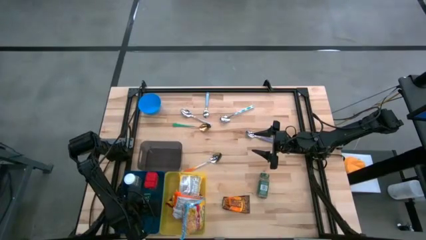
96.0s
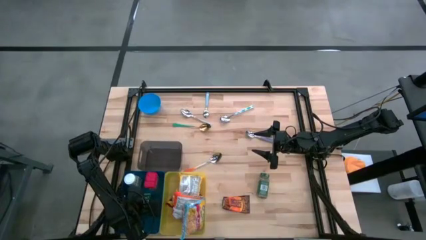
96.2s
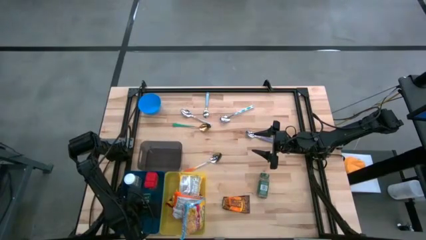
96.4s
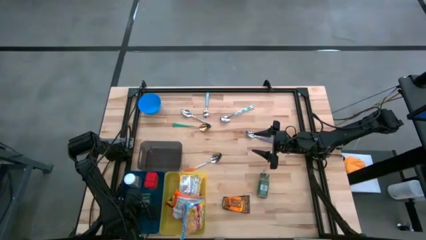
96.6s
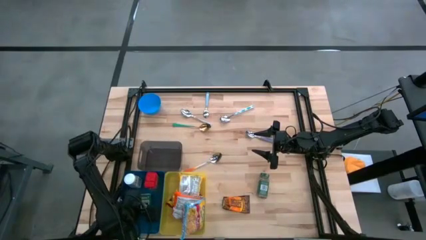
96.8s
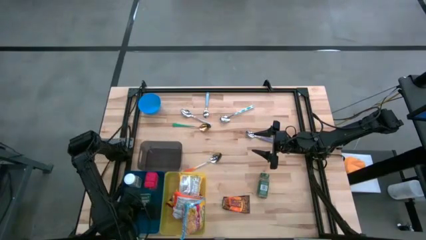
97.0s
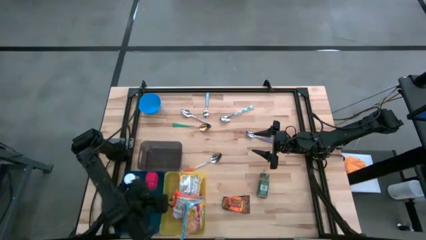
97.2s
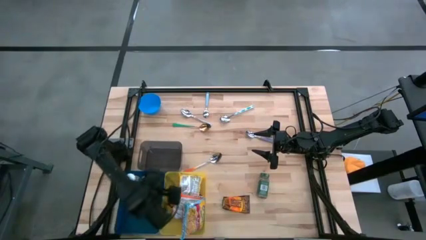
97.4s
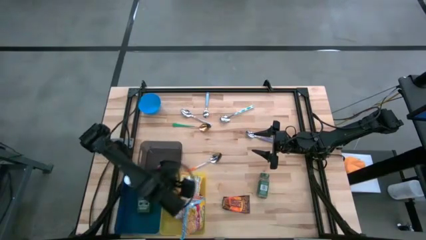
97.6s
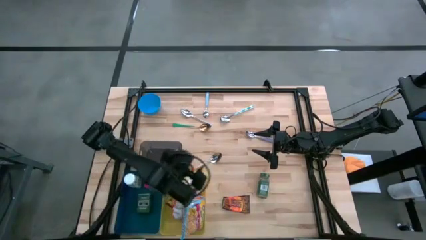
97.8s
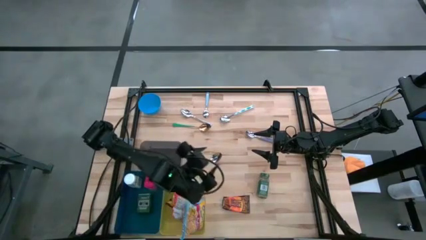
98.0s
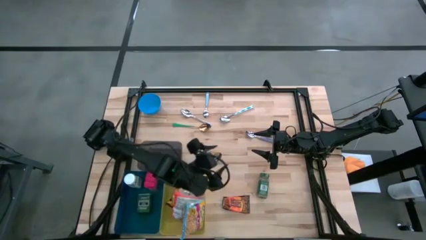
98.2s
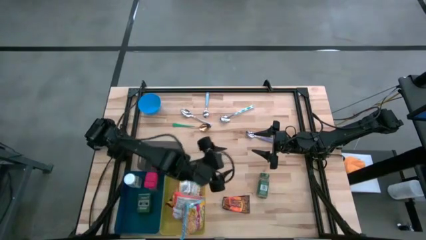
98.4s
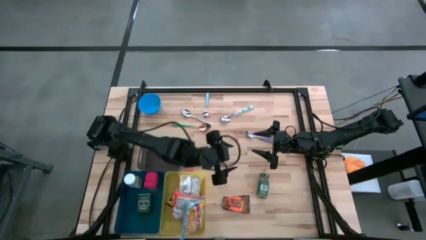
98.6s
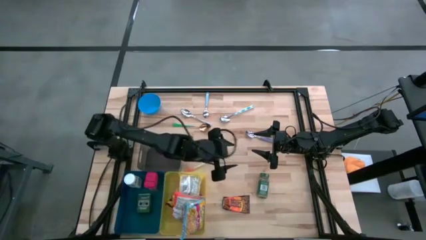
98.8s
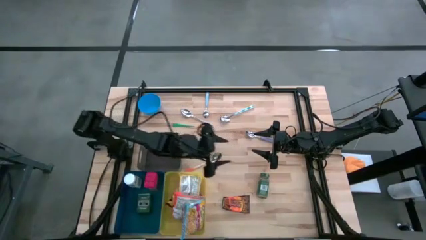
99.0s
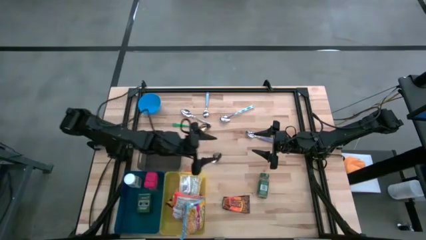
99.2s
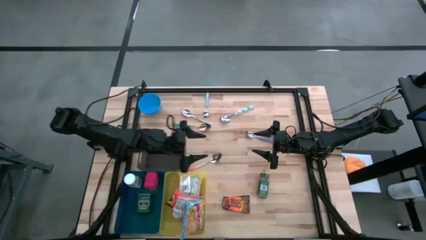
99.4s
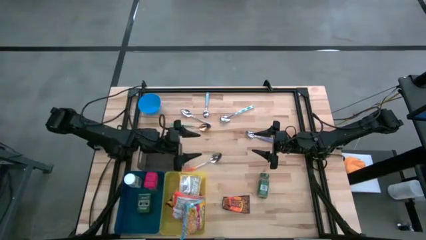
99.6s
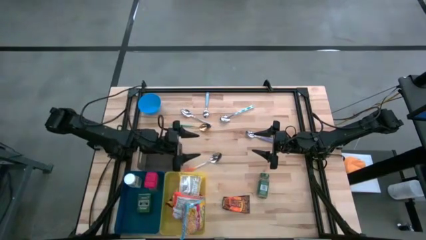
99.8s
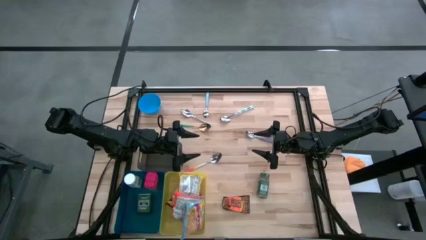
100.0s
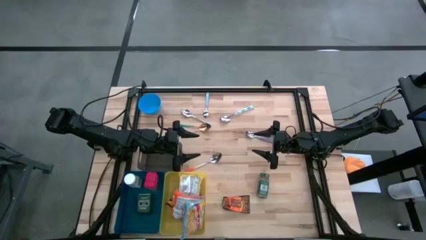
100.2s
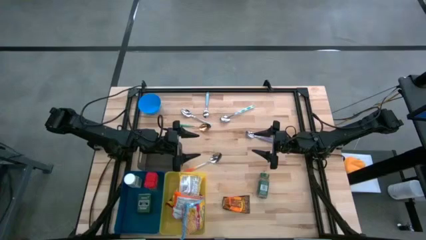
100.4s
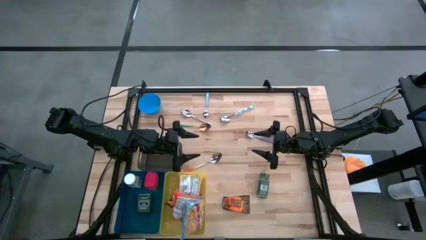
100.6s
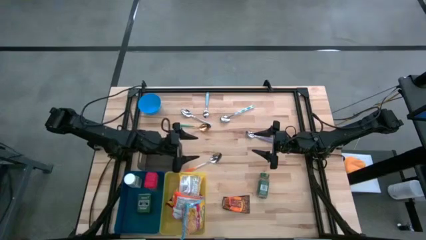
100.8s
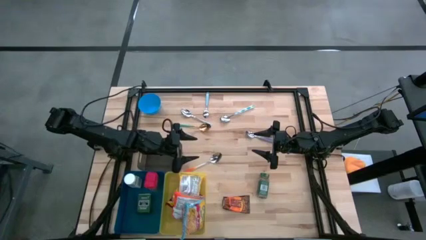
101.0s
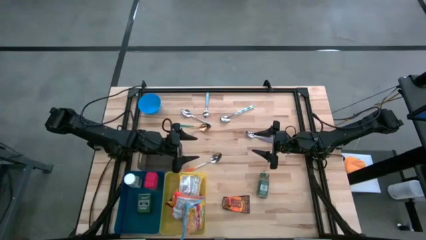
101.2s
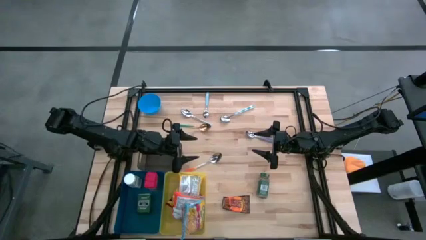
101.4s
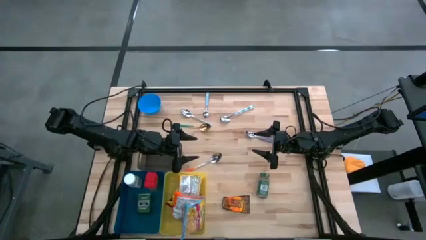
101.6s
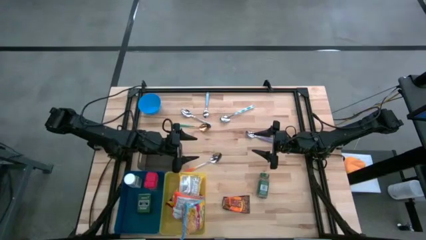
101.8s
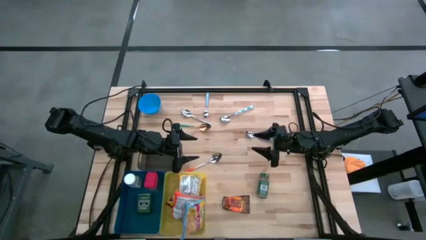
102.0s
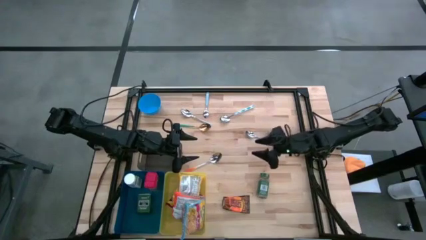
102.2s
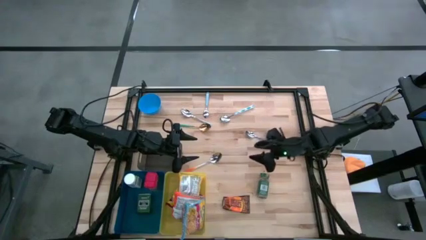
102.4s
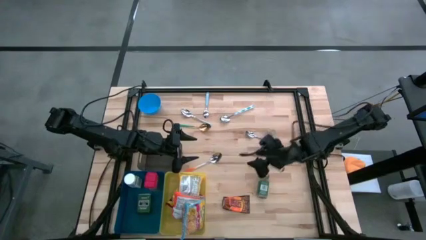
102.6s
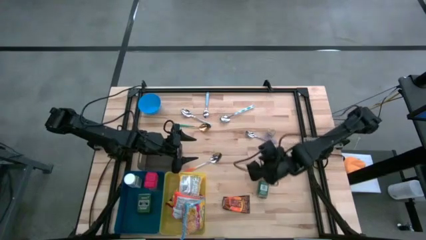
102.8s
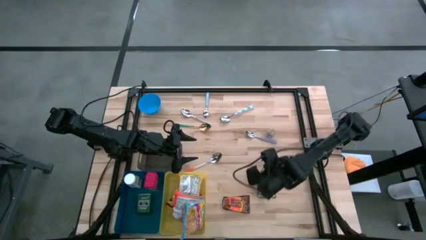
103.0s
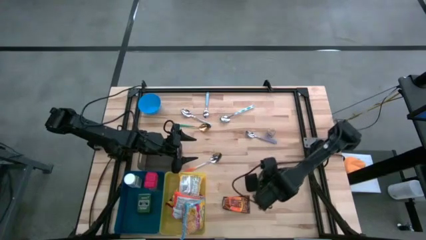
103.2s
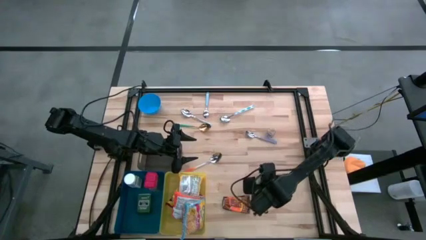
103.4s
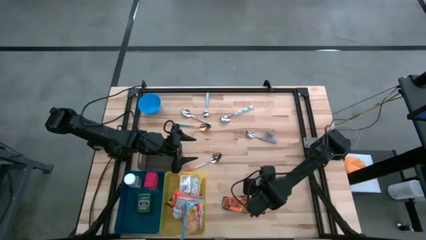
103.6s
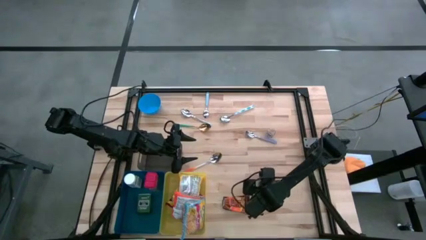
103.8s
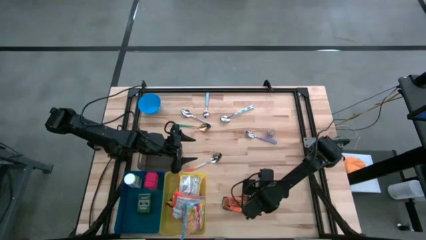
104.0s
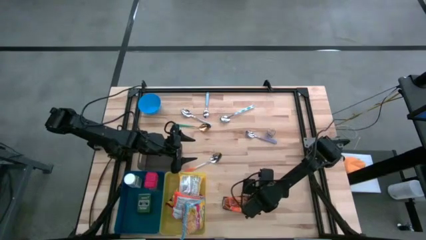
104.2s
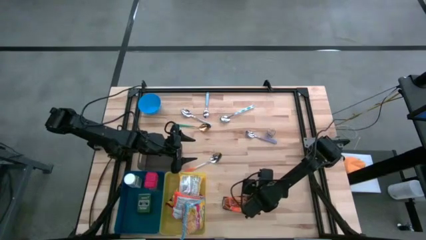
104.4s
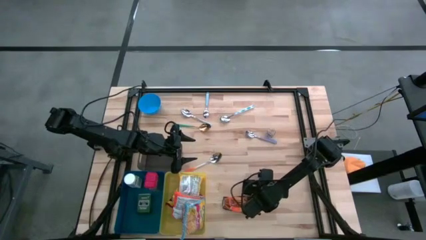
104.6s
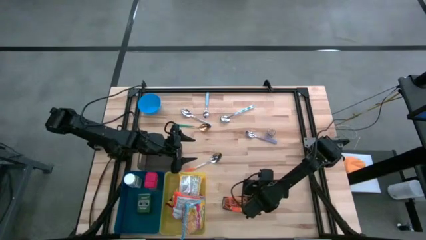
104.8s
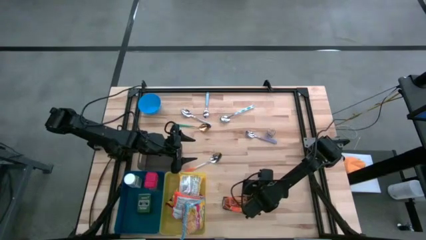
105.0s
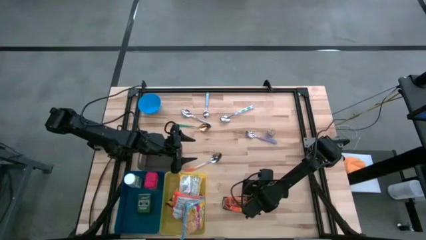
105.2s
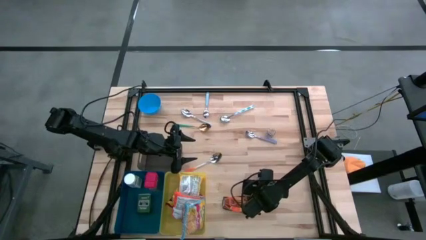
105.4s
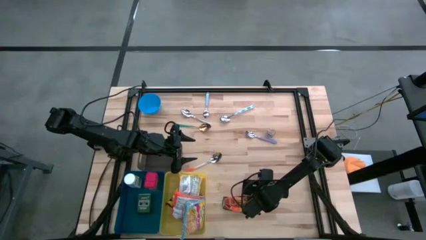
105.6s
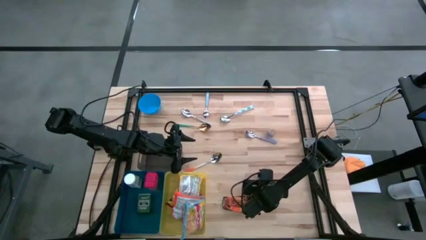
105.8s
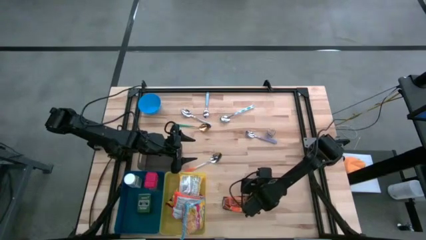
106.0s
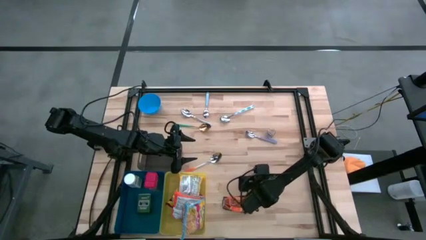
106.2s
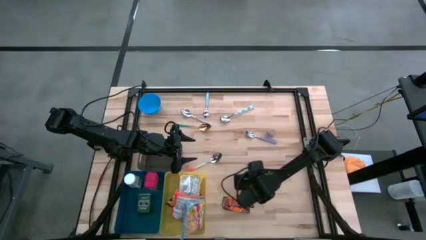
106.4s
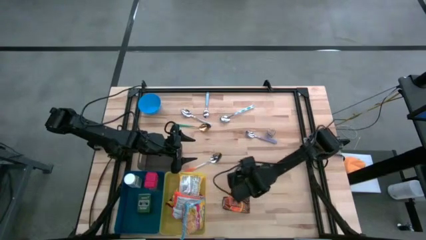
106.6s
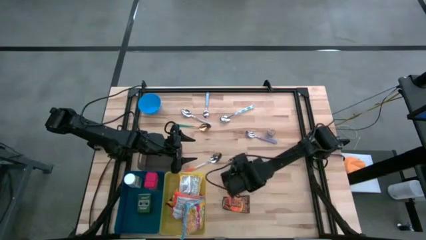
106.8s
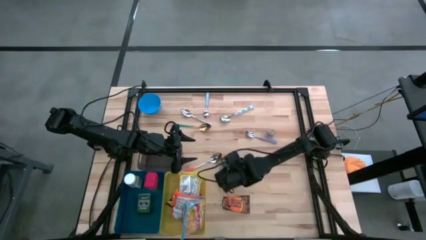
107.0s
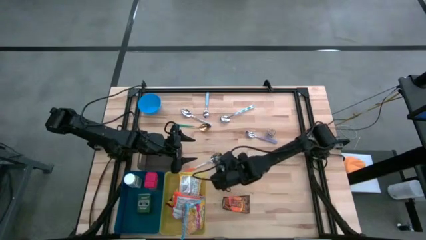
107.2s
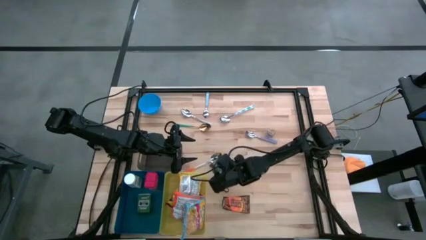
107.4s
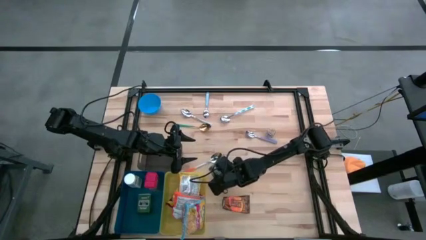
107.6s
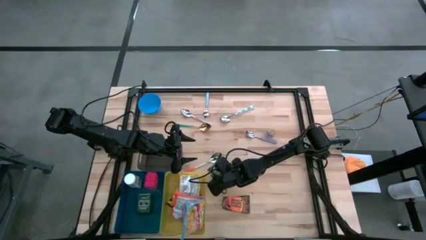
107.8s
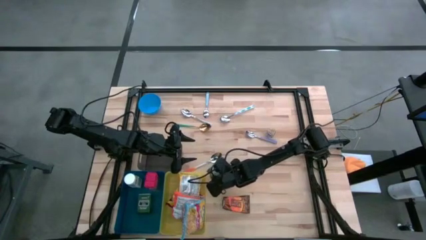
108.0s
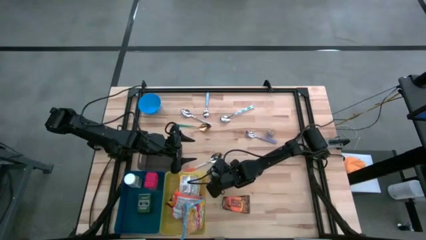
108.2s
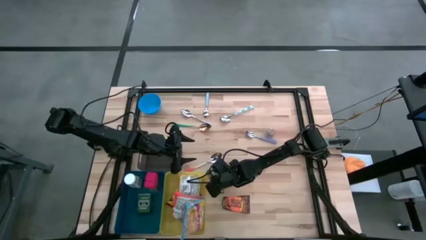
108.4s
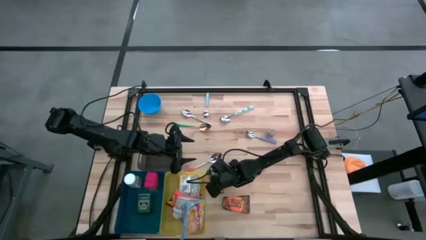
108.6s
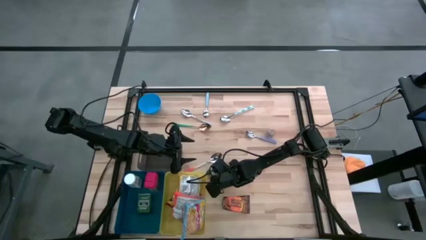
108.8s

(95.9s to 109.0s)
Put the green seasoning bottle into the blue bin
